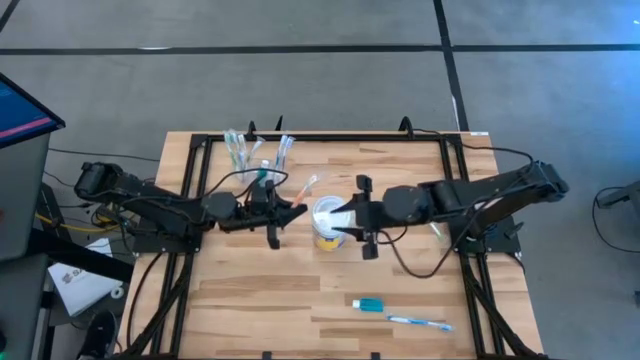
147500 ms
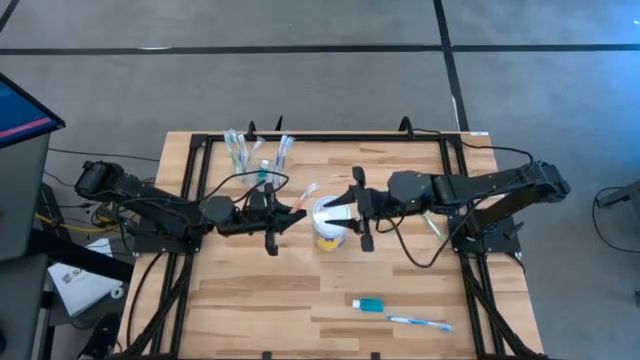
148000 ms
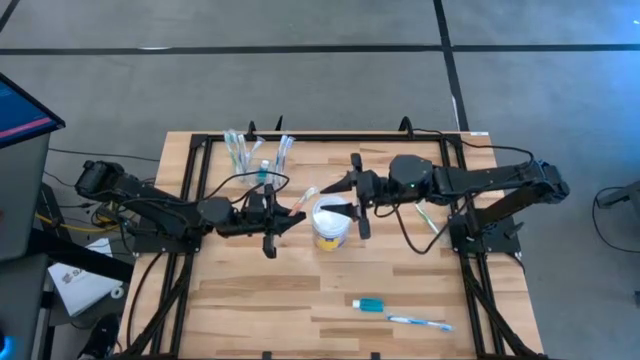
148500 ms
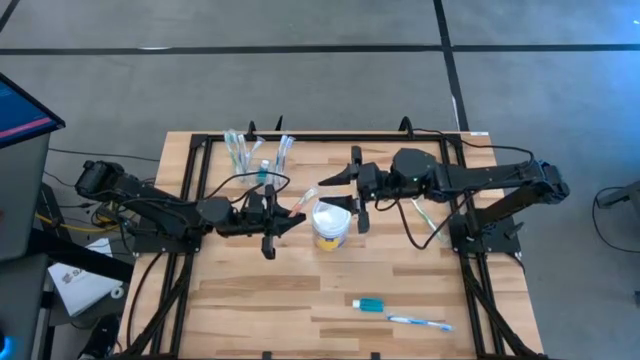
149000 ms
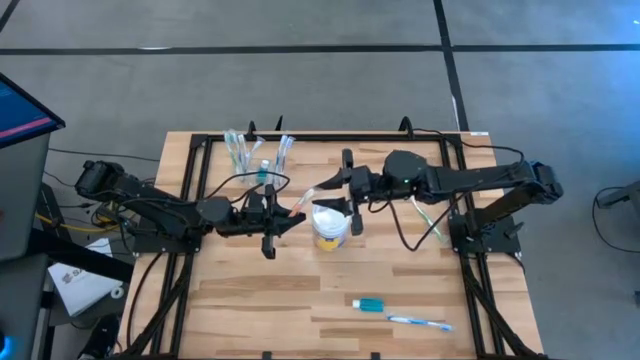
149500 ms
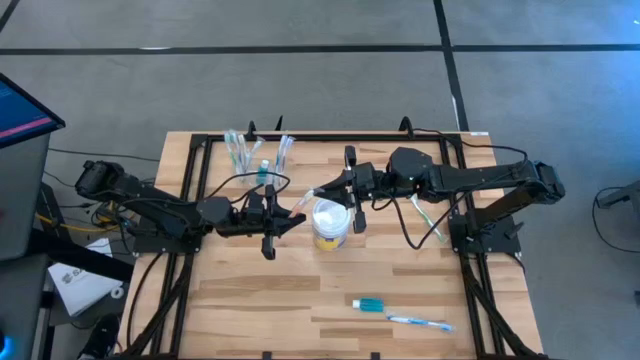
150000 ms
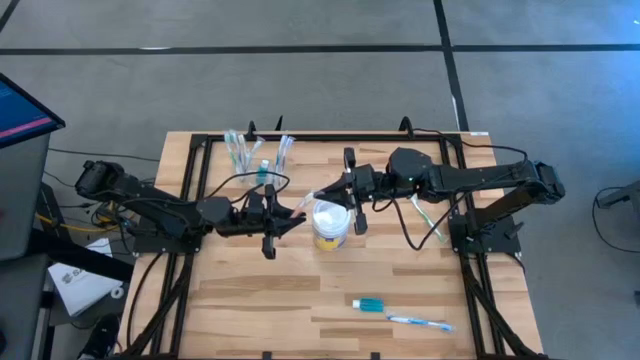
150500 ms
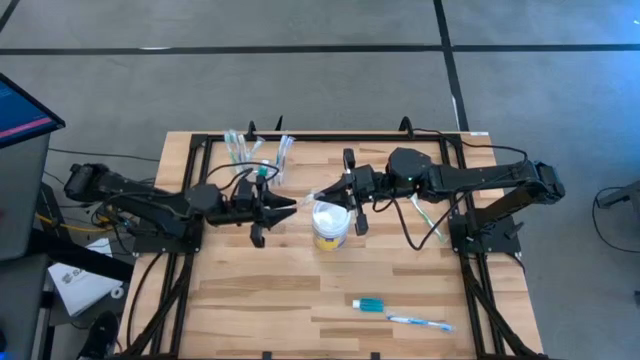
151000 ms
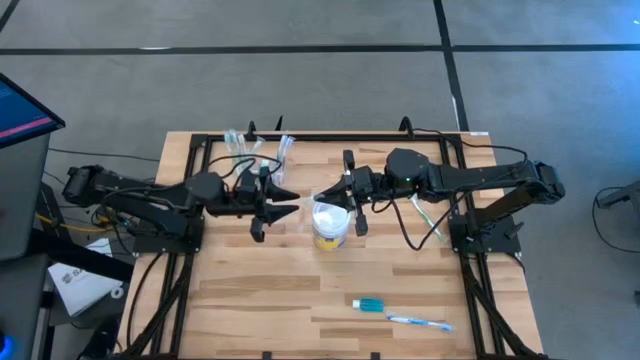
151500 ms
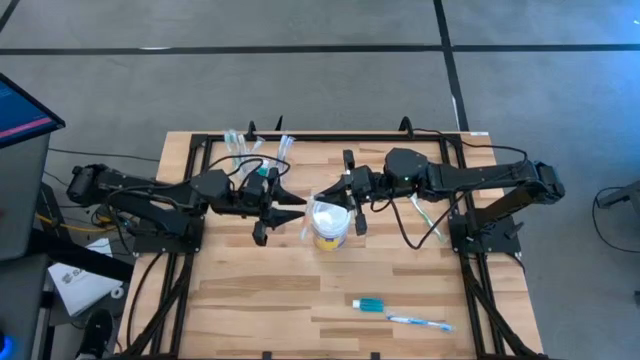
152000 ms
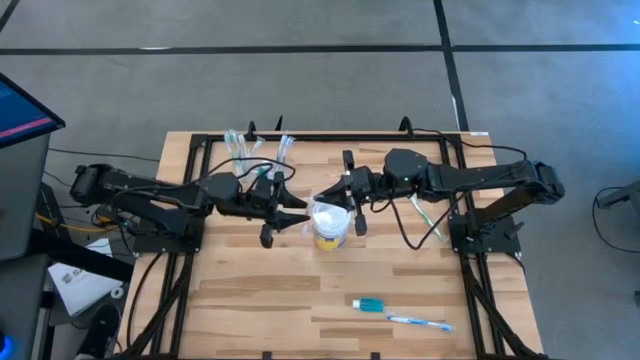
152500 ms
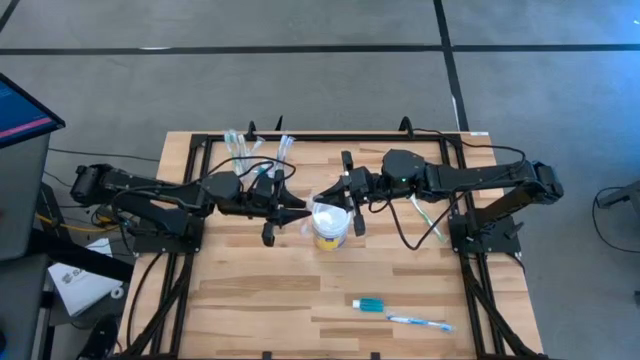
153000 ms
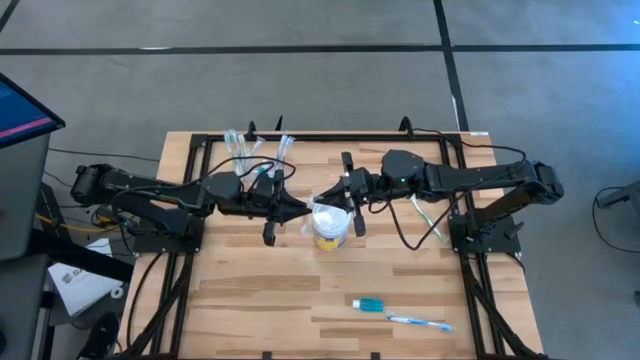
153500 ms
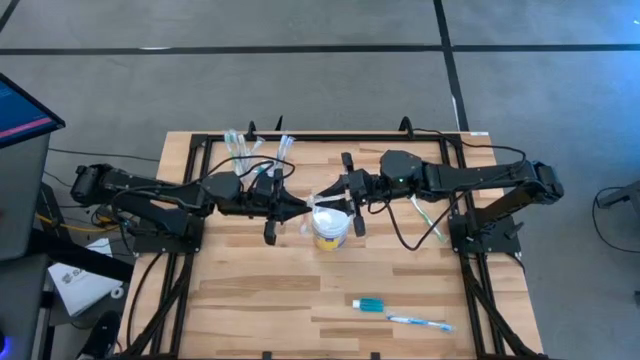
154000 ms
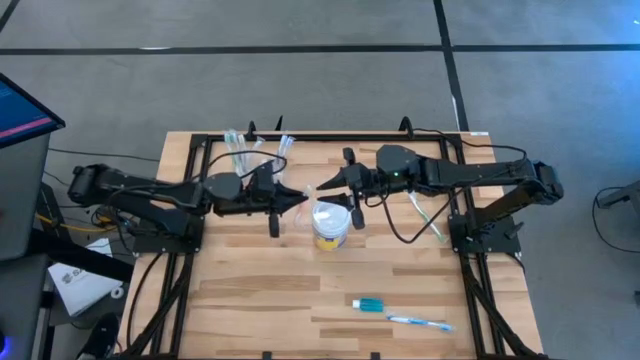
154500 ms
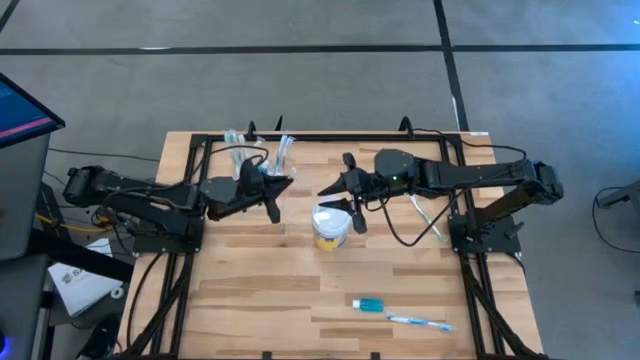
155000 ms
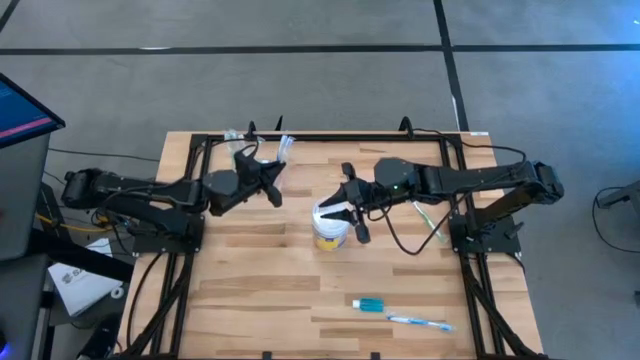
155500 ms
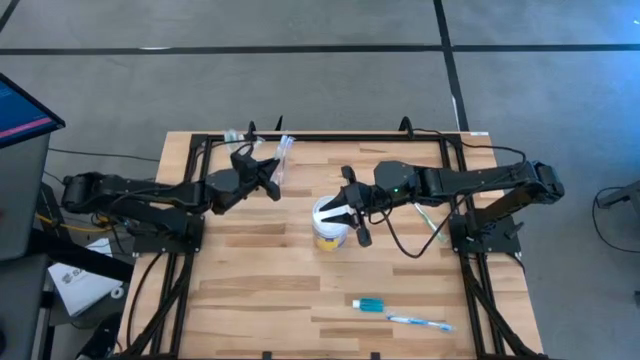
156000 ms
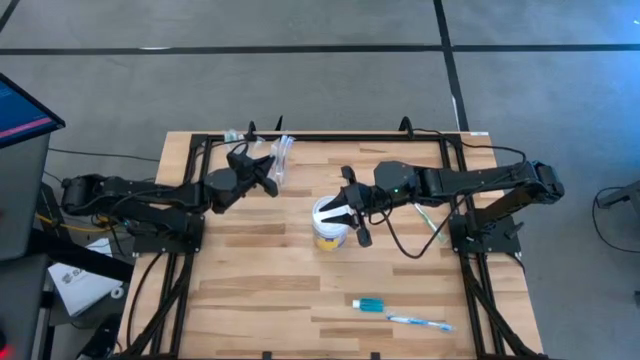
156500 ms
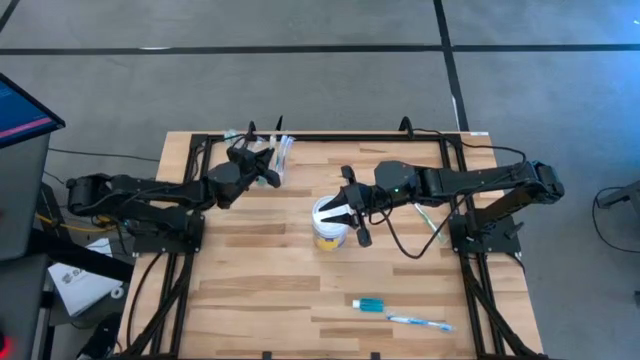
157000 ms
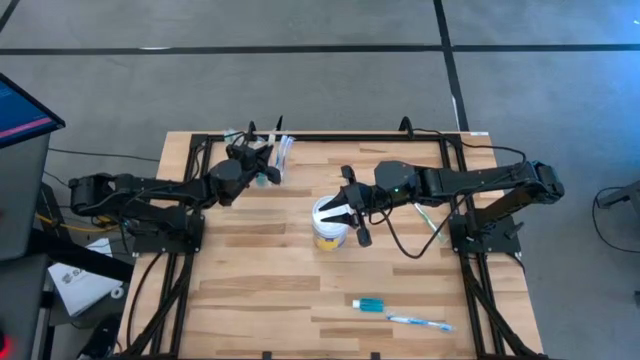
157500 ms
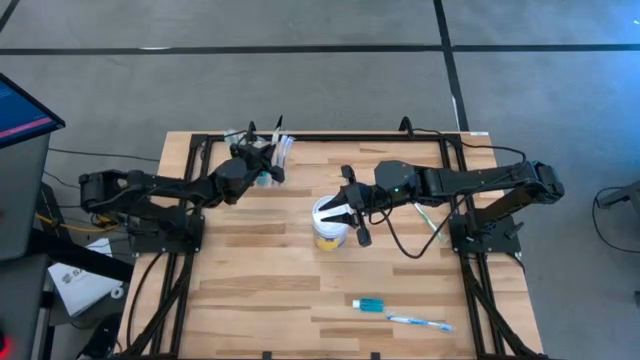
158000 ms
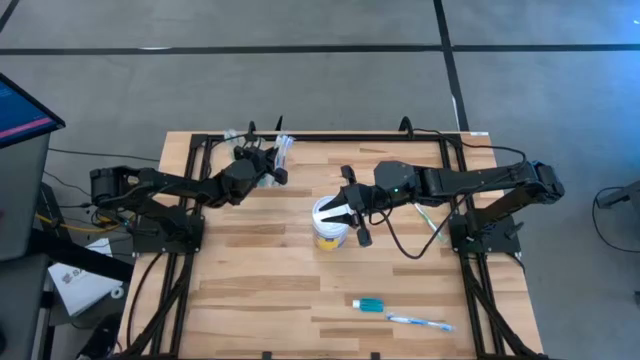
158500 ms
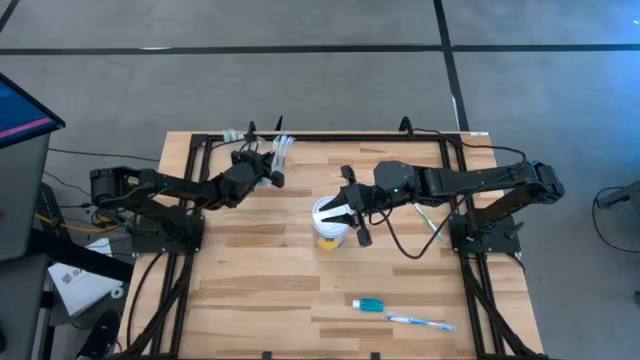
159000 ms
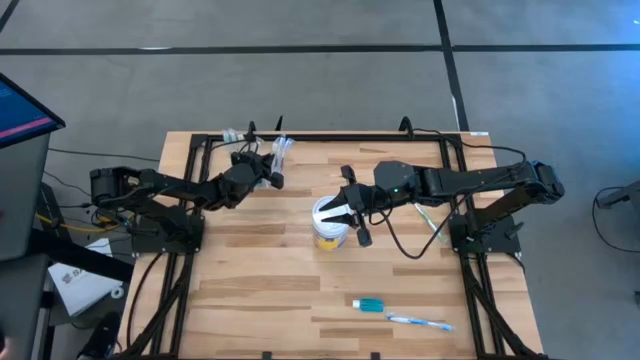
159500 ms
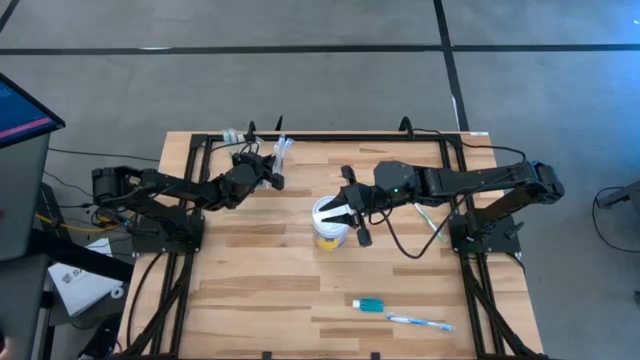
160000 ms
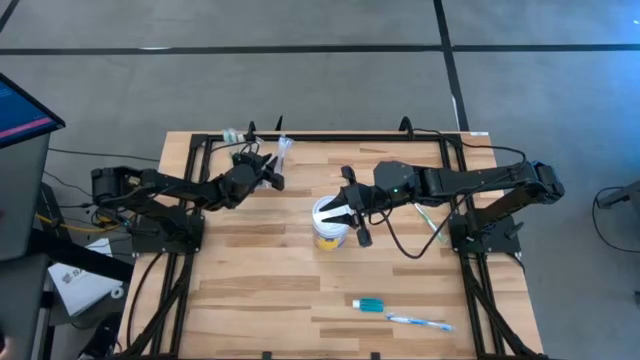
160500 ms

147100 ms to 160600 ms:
Task: Pick & Place toothbrushing station
Put the orange toothbrush into the transparent organizer

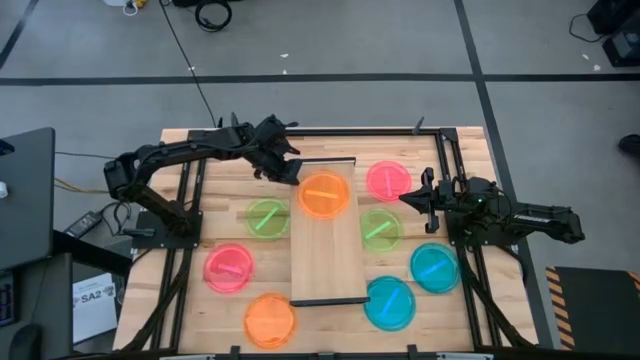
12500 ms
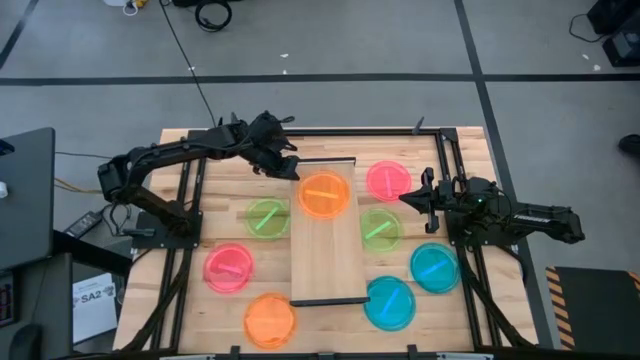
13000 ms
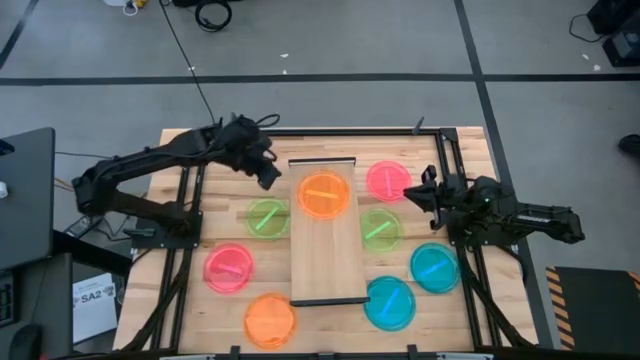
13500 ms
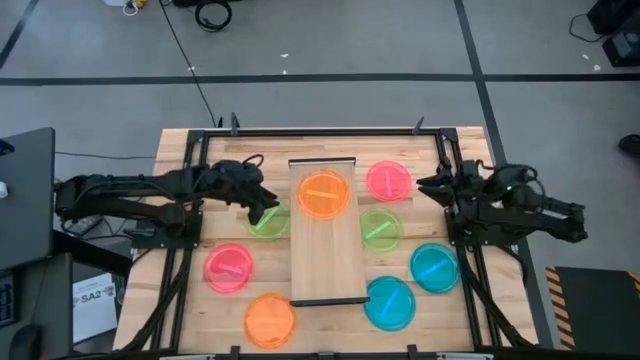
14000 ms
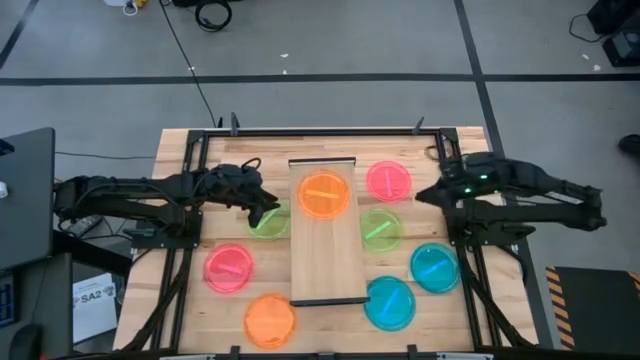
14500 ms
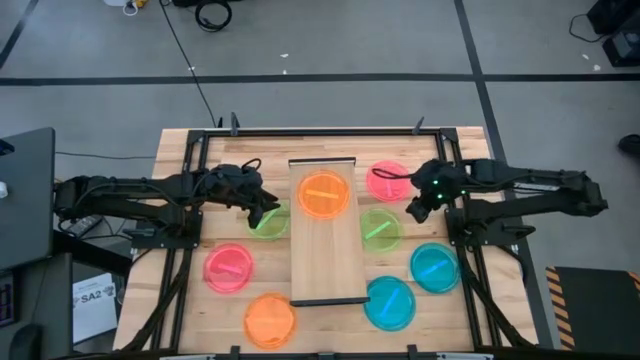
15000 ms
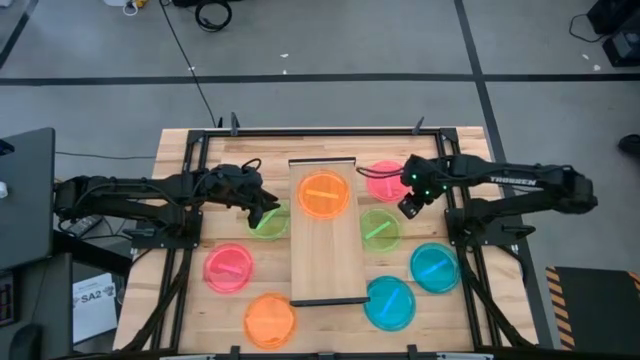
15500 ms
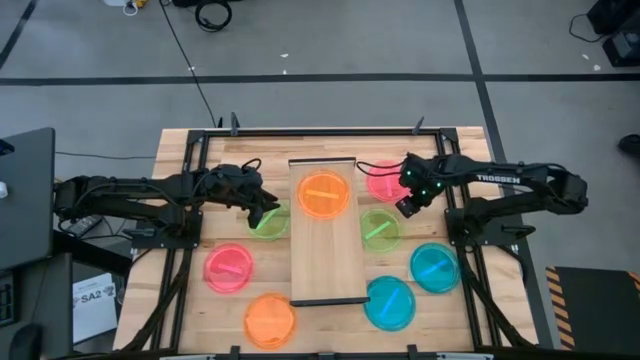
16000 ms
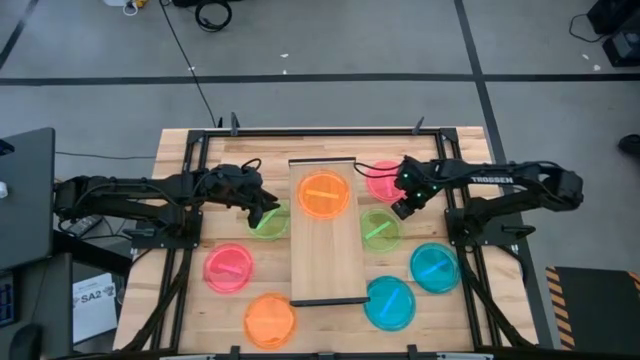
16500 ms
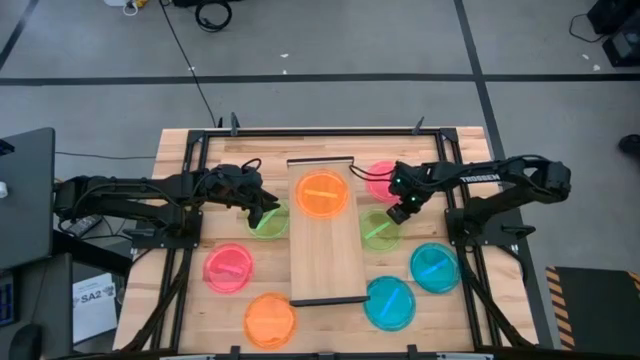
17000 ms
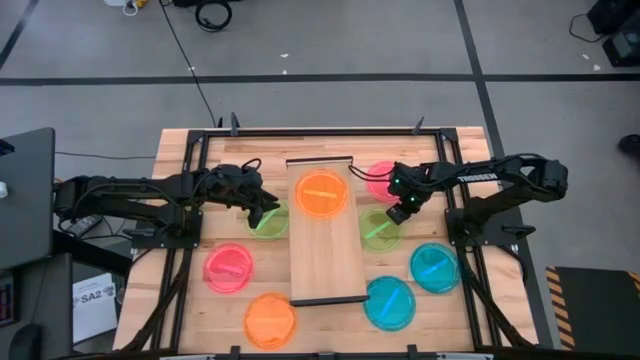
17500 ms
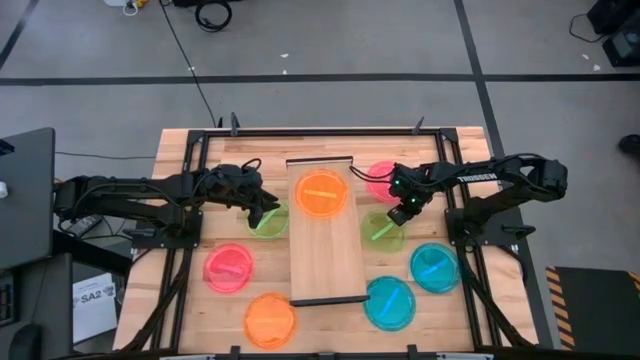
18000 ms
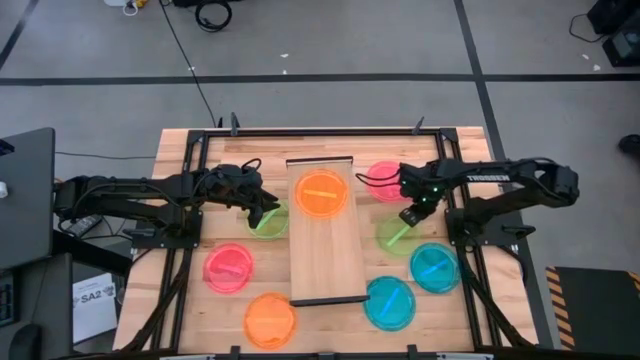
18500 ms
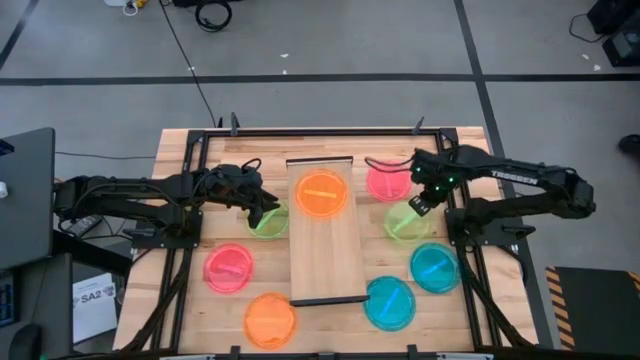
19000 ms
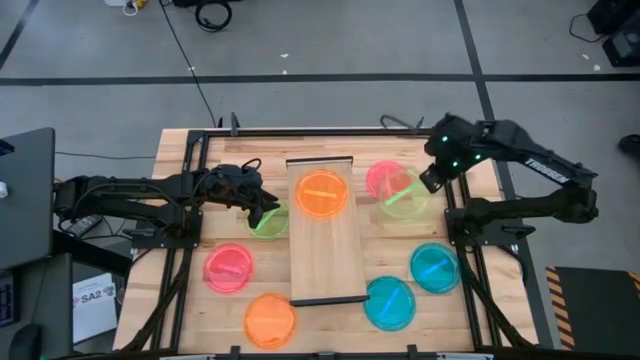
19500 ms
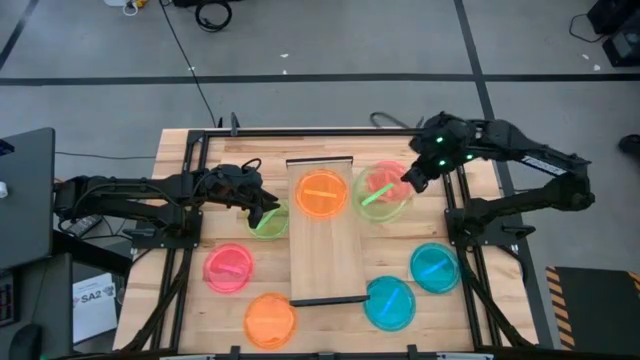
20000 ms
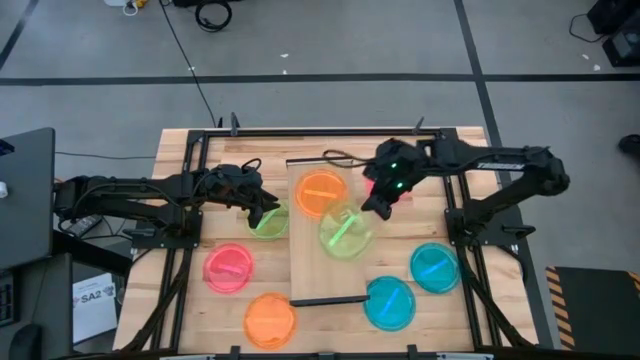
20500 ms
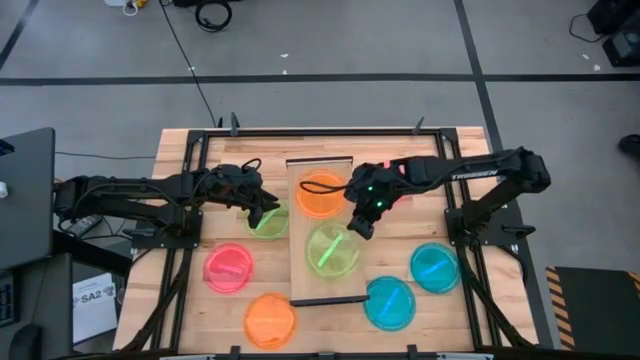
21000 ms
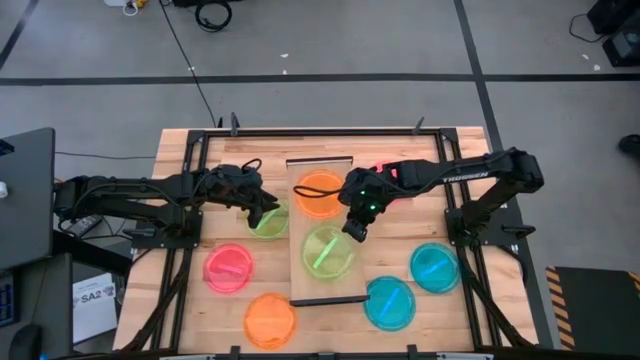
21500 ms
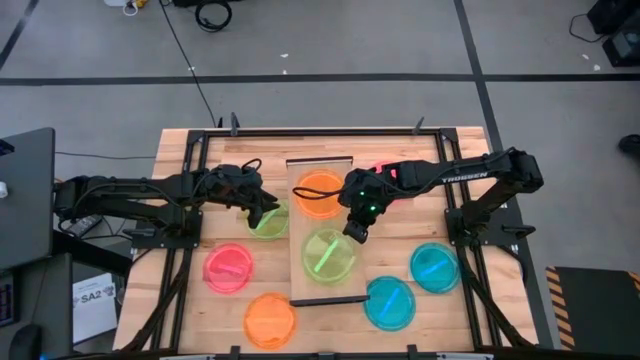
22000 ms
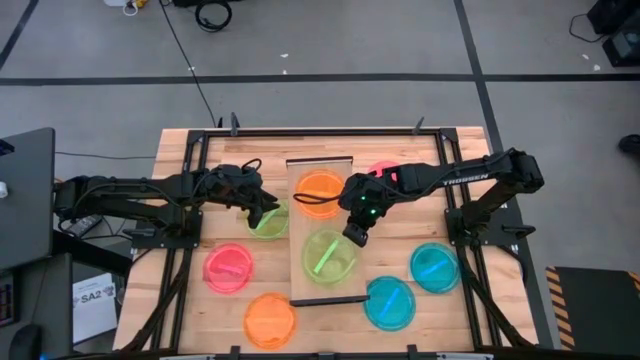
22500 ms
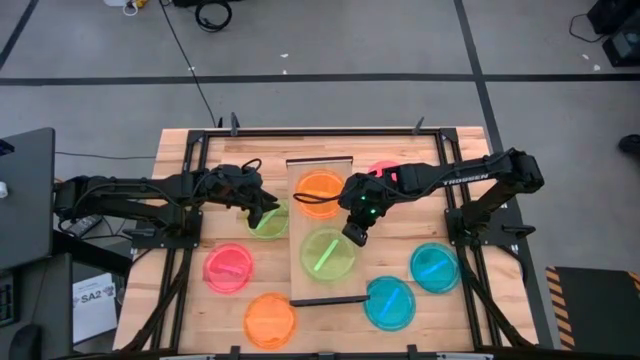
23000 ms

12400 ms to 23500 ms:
Task: Place and stack plates onto a shelf
Put the right green plate on the shelf
